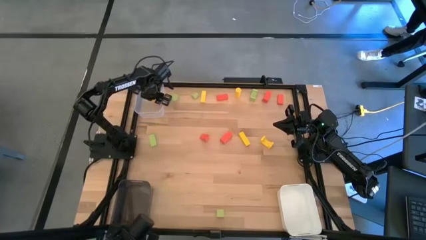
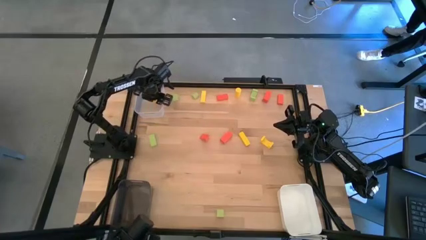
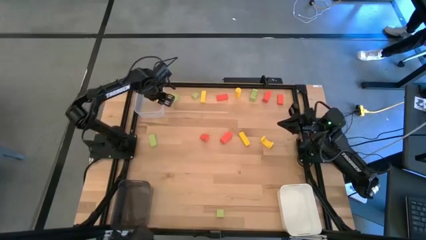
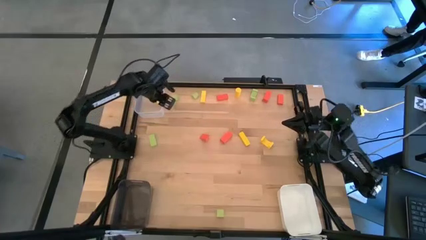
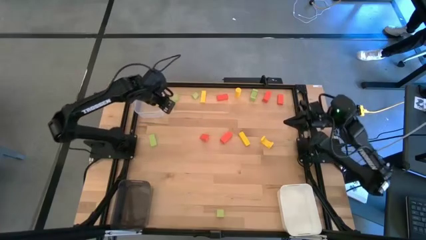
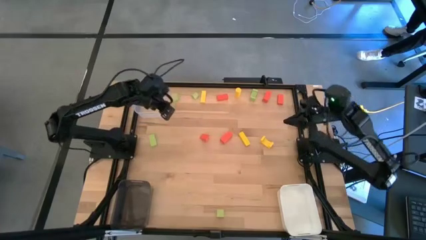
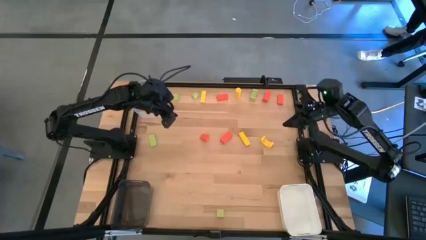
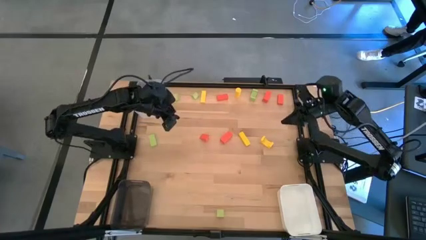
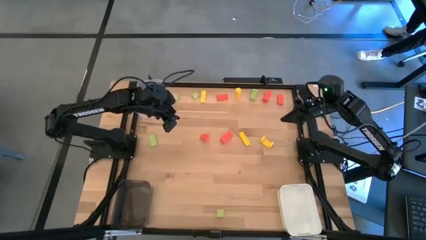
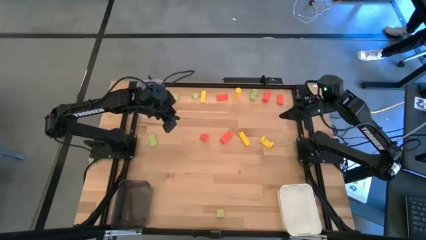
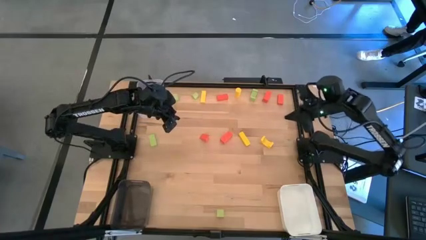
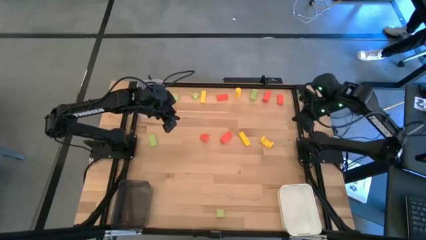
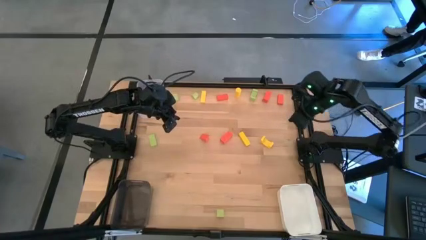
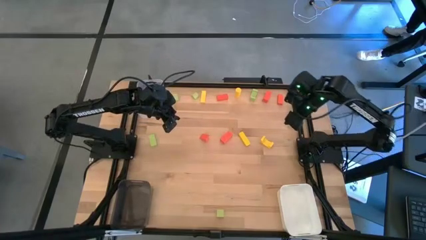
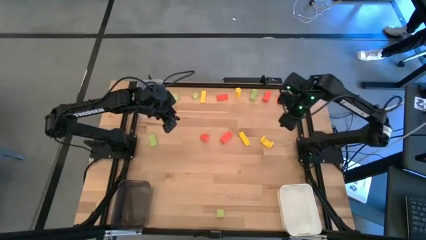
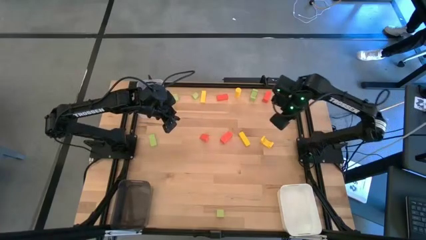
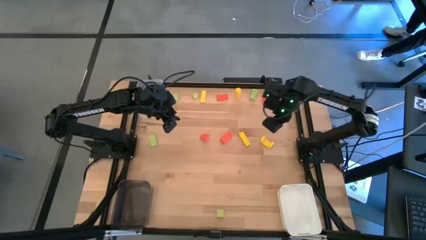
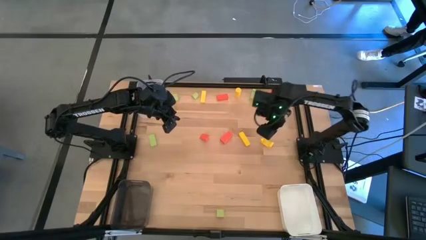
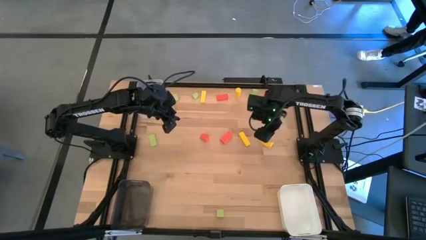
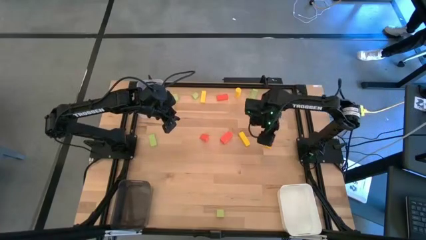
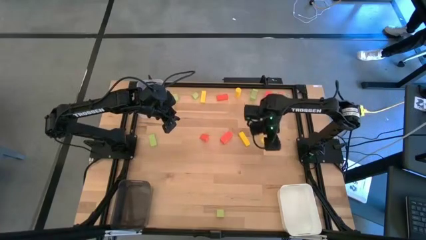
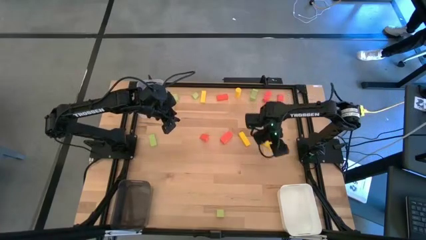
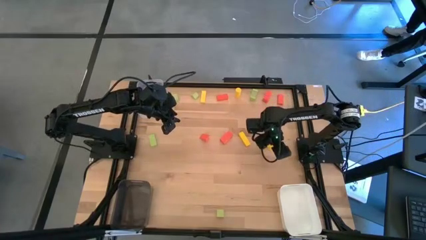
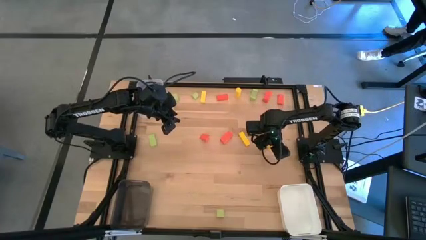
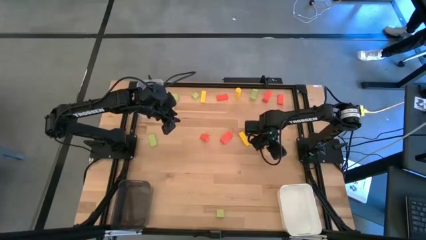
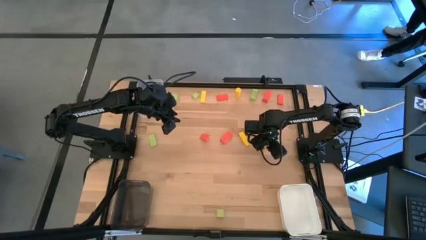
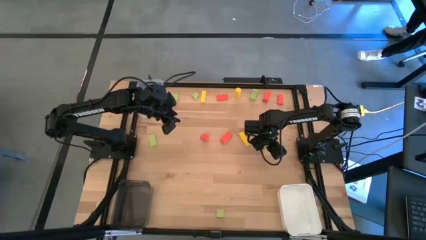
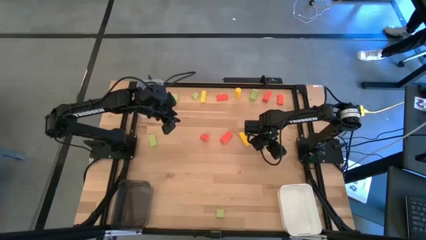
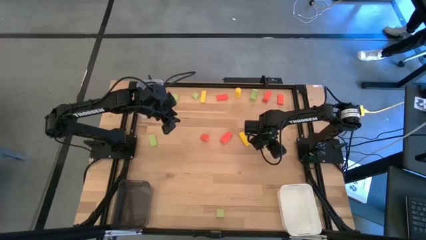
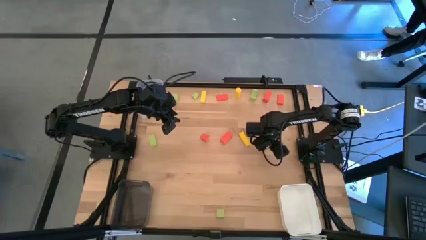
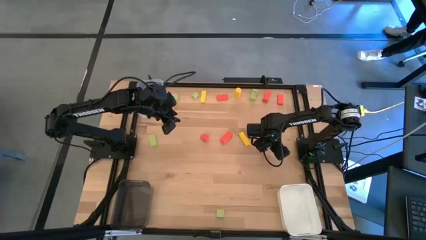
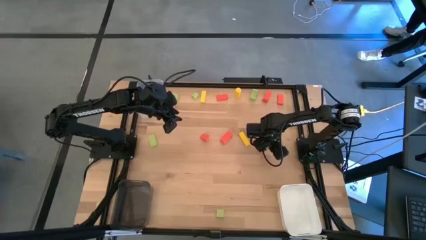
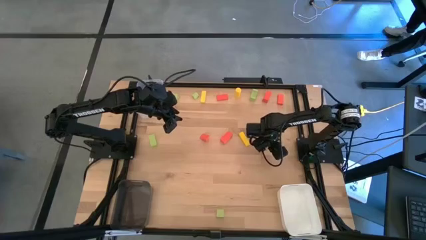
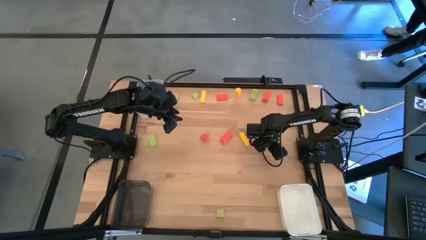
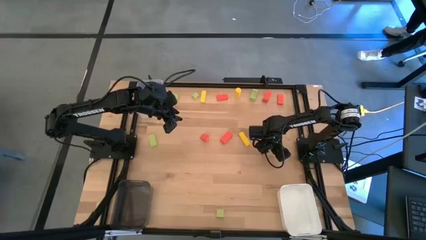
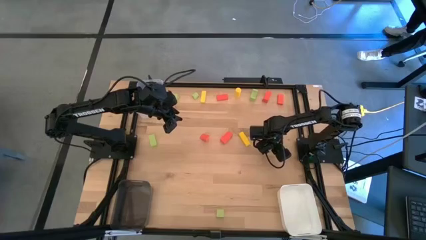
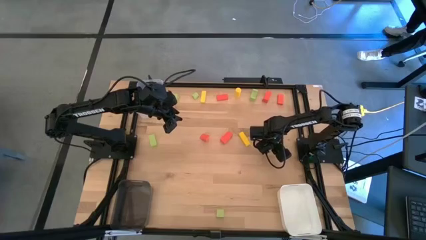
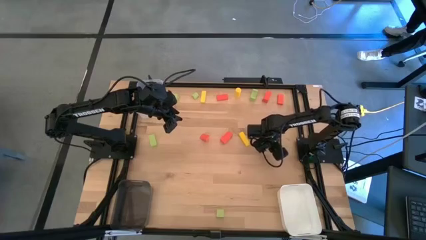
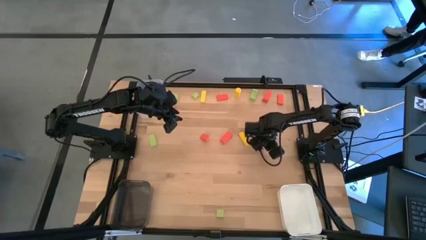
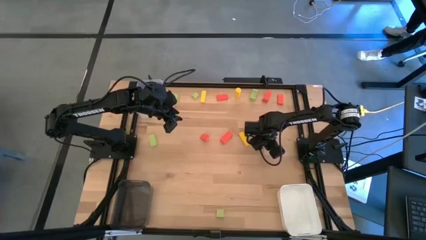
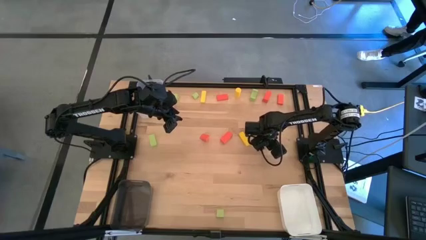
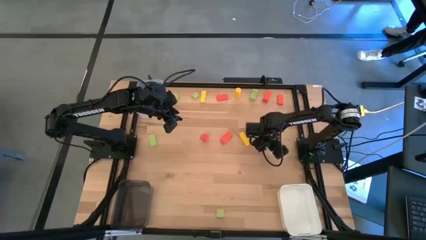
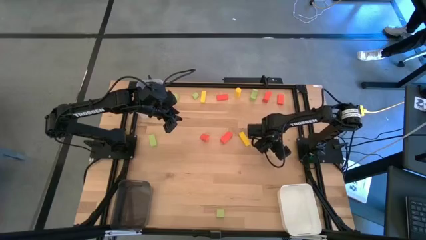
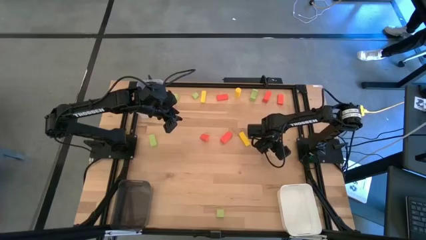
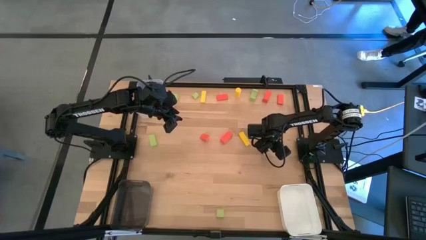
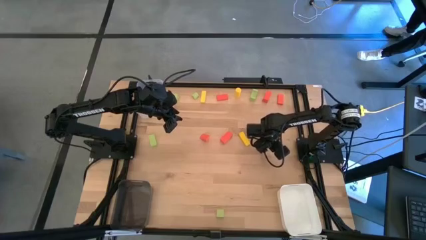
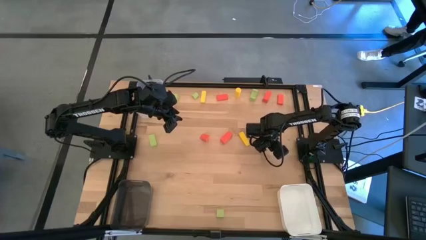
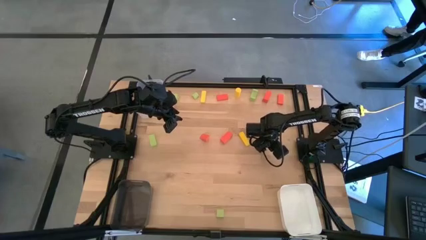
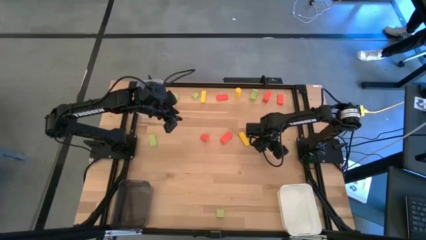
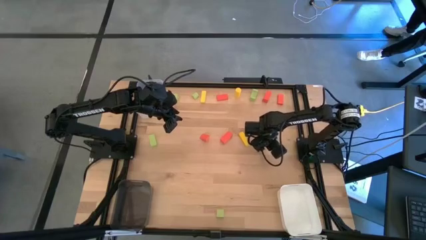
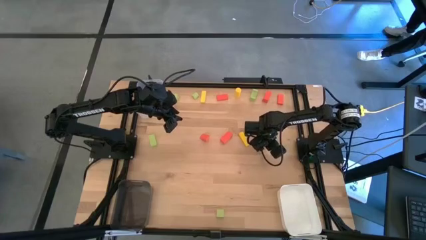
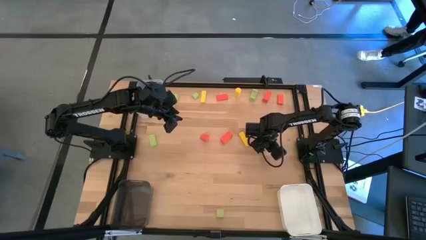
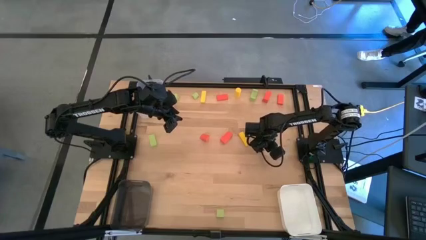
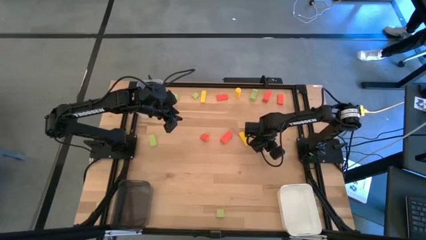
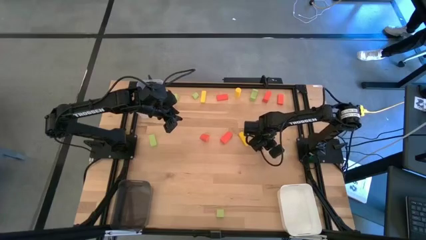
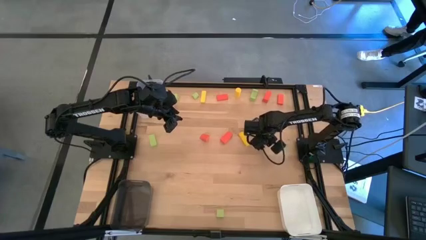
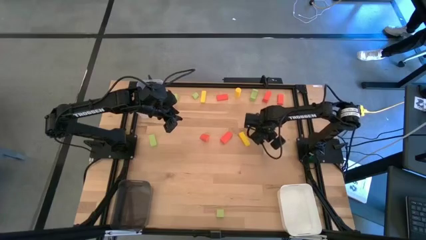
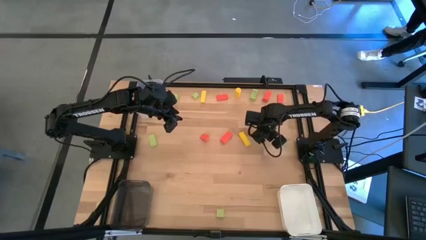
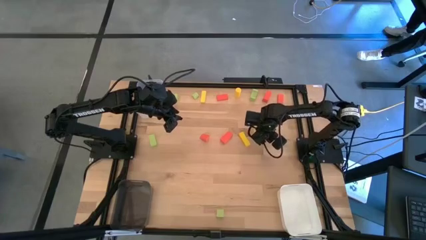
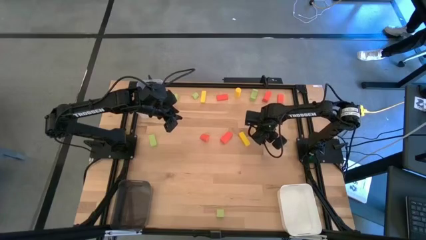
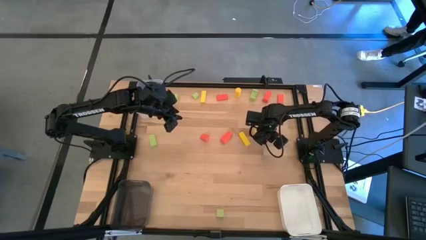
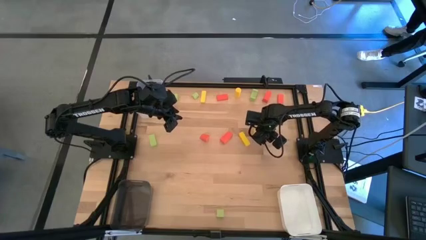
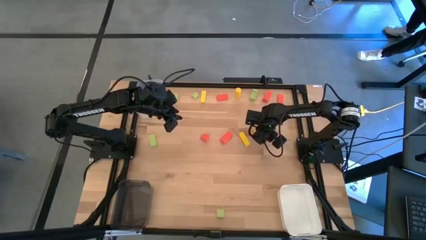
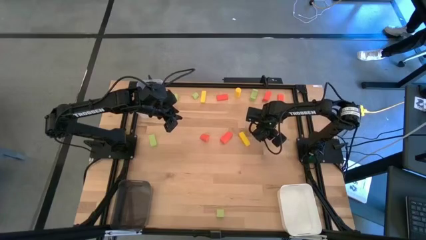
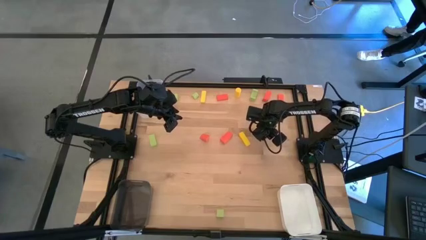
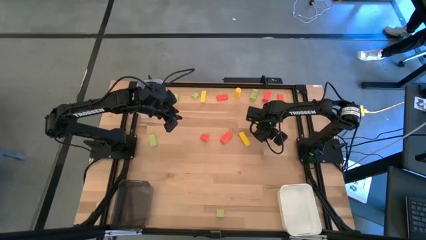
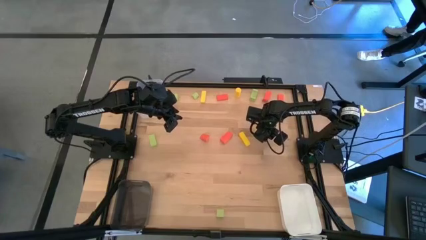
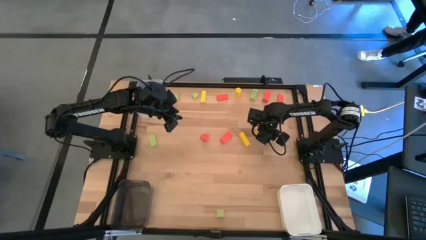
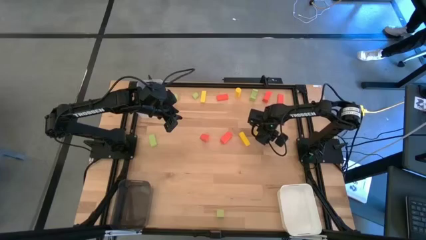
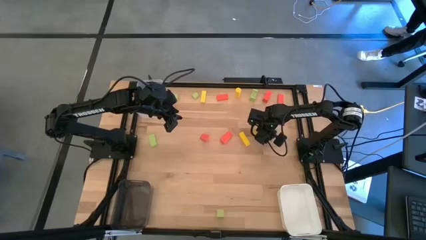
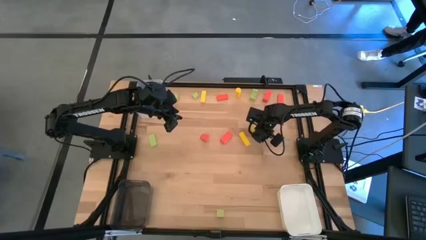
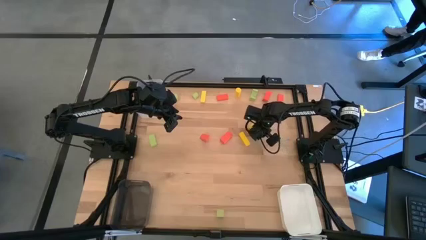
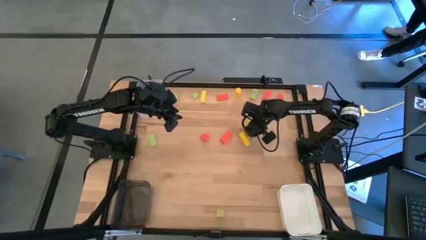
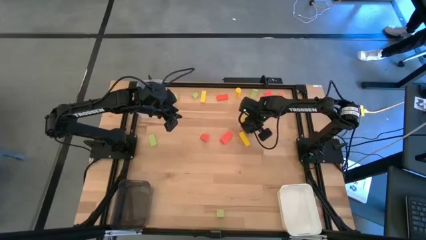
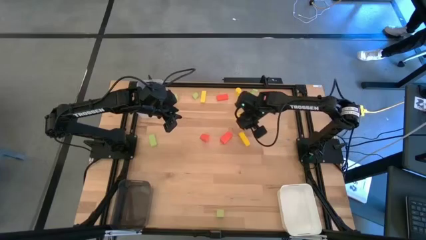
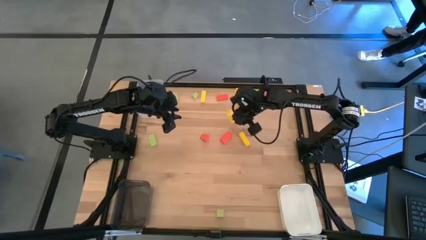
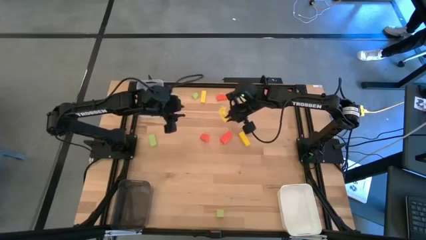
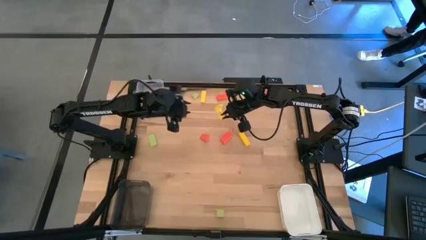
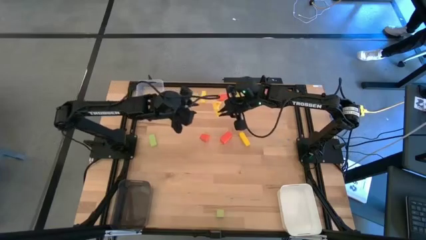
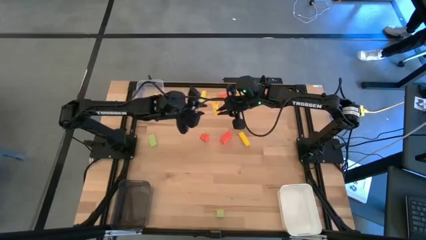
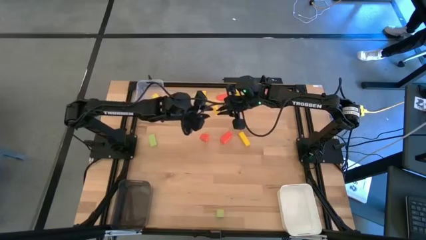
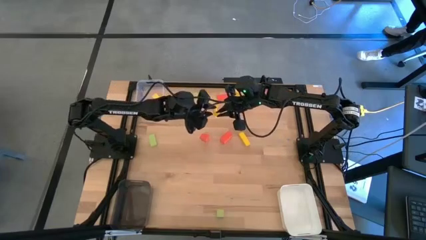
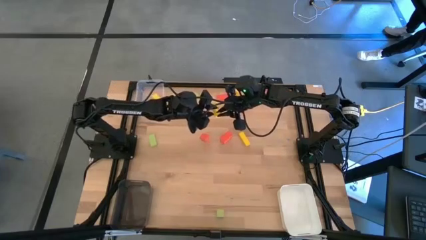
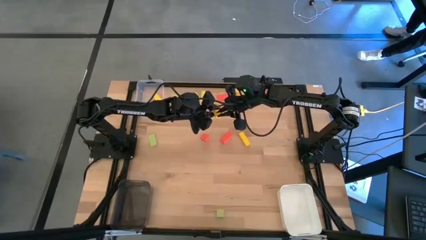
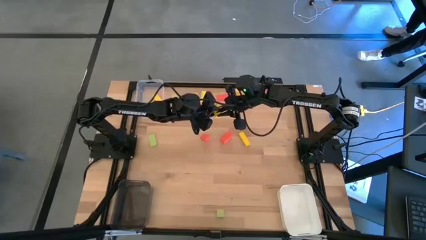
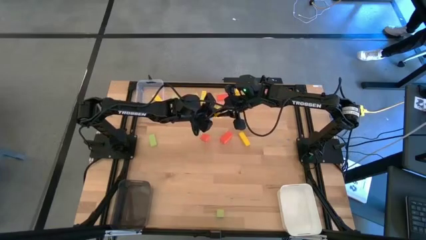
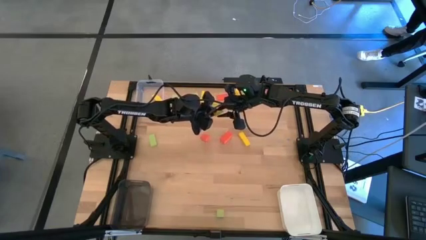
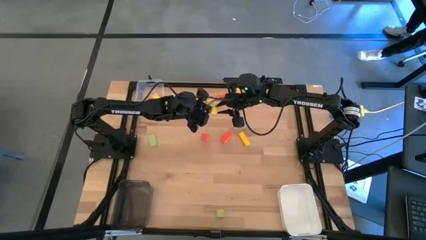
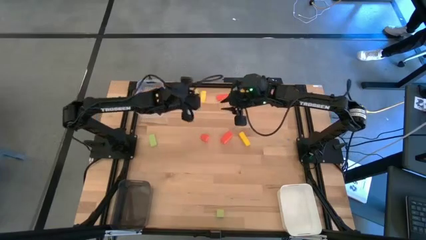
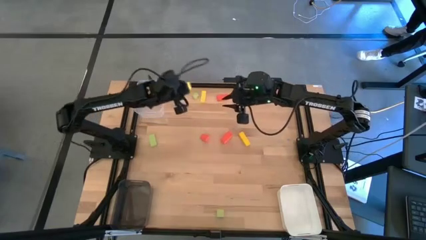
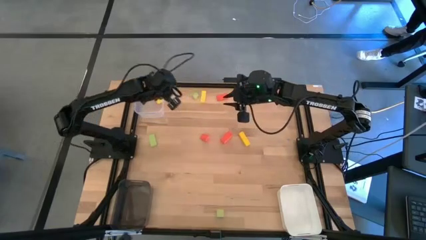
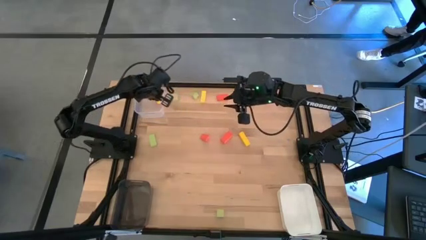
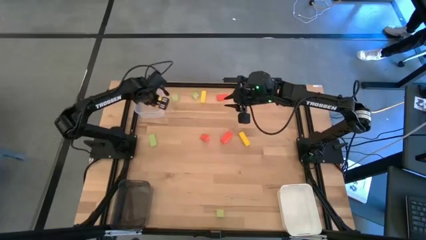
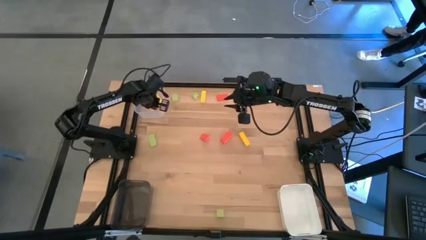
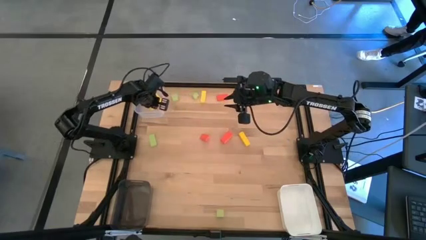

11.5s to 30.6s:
Task: Sort & place blocks by color
Put the yellow block into the transparent bin
